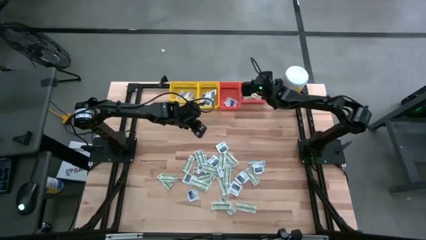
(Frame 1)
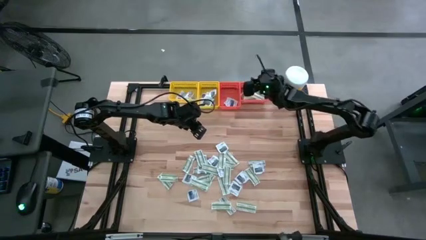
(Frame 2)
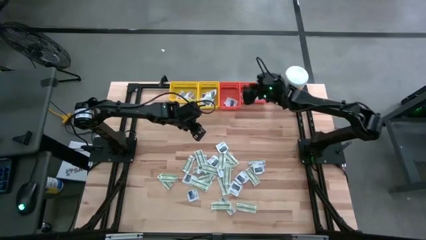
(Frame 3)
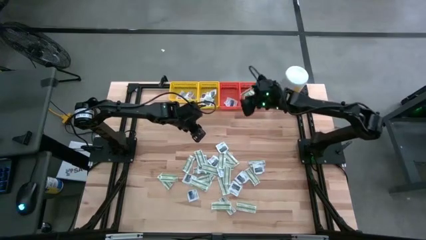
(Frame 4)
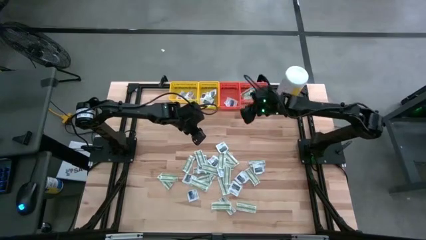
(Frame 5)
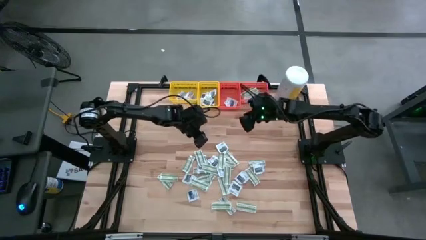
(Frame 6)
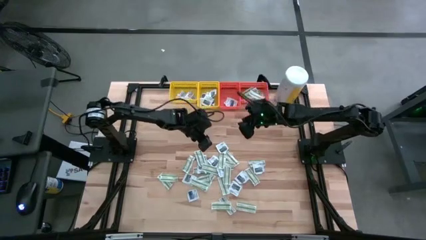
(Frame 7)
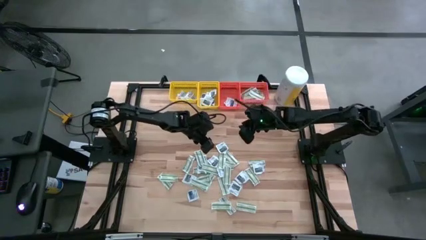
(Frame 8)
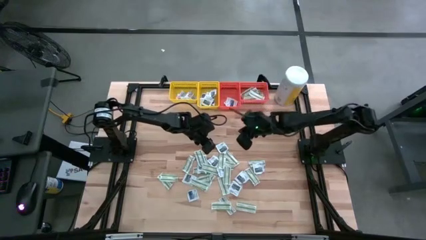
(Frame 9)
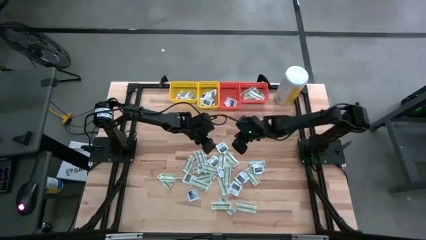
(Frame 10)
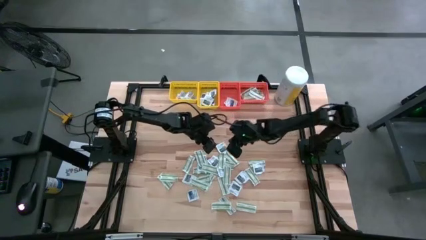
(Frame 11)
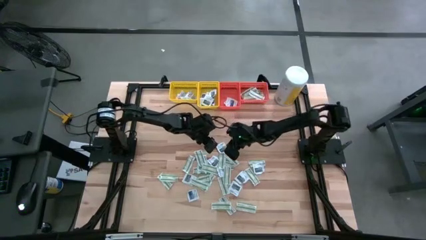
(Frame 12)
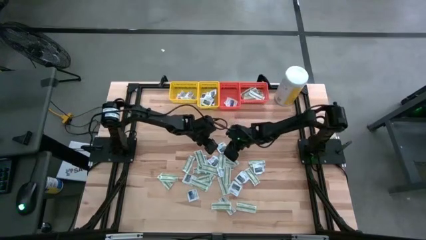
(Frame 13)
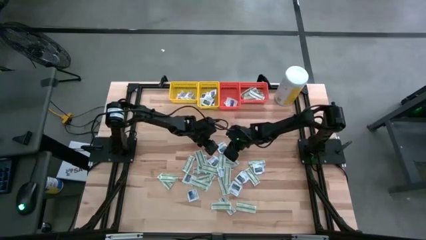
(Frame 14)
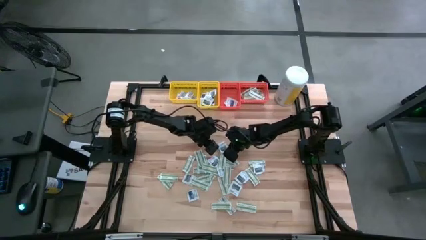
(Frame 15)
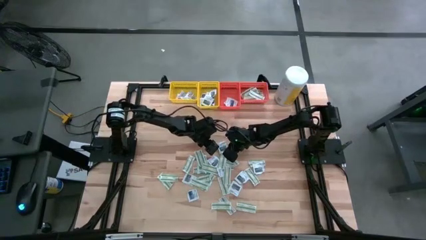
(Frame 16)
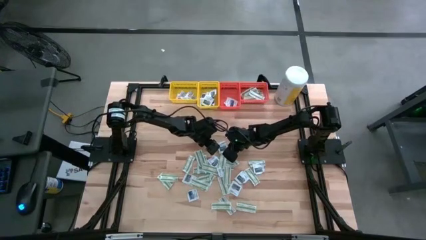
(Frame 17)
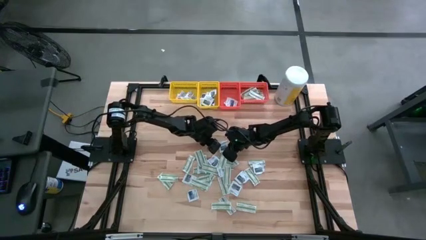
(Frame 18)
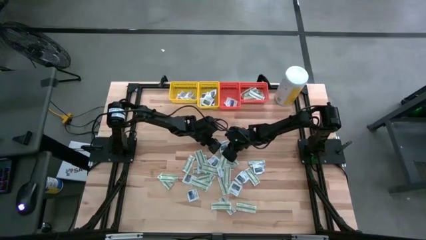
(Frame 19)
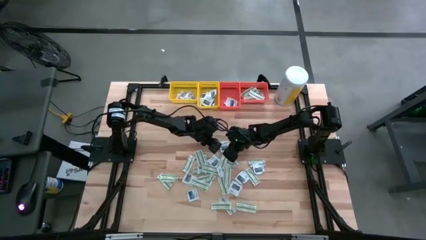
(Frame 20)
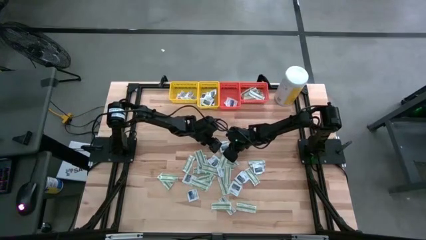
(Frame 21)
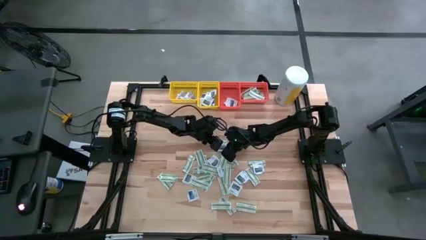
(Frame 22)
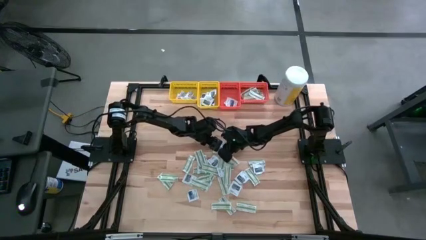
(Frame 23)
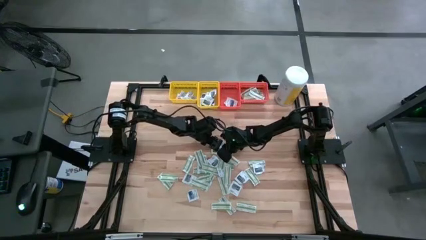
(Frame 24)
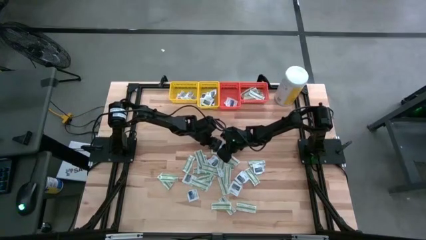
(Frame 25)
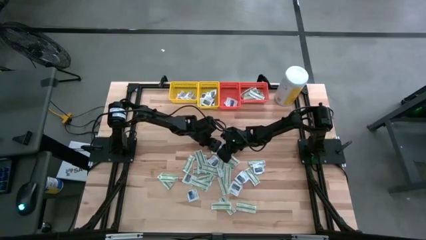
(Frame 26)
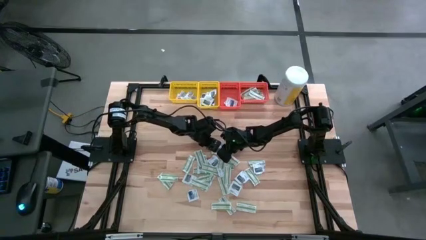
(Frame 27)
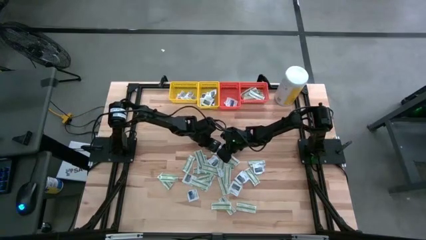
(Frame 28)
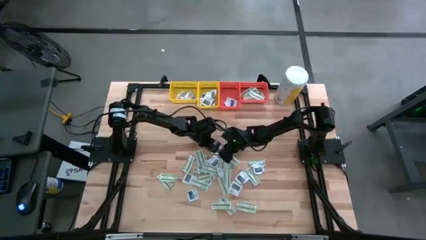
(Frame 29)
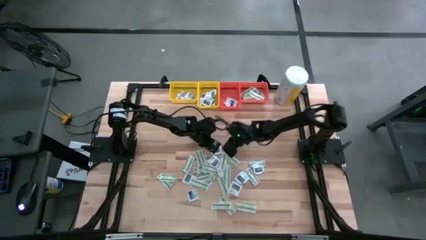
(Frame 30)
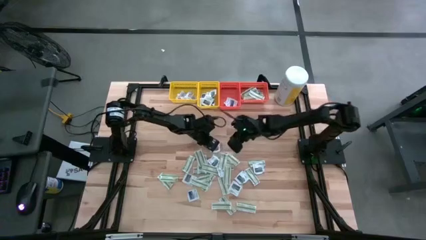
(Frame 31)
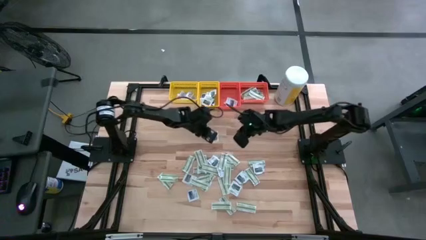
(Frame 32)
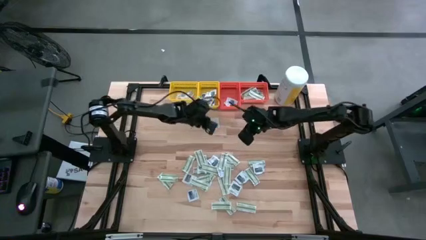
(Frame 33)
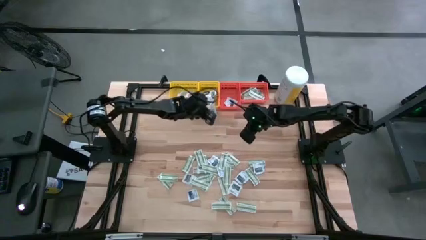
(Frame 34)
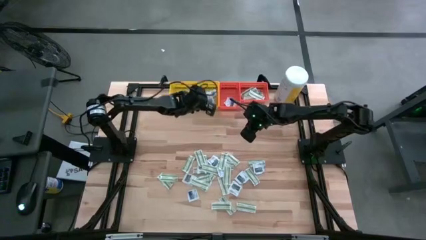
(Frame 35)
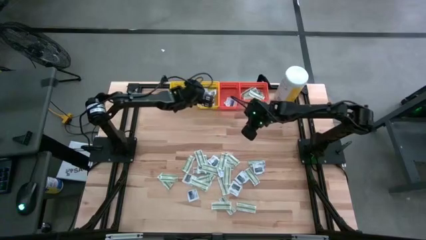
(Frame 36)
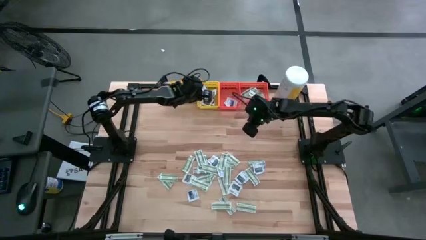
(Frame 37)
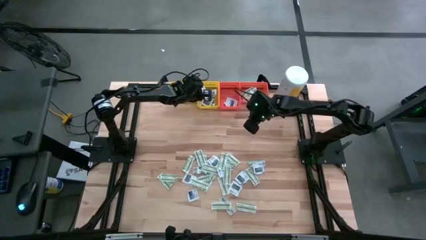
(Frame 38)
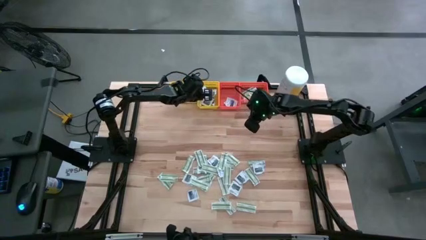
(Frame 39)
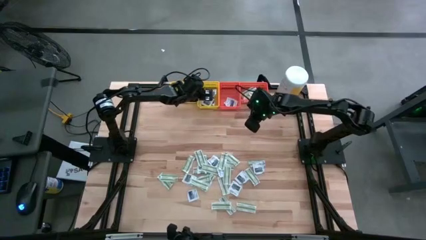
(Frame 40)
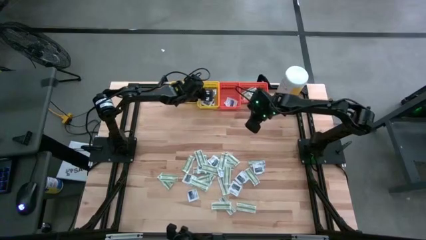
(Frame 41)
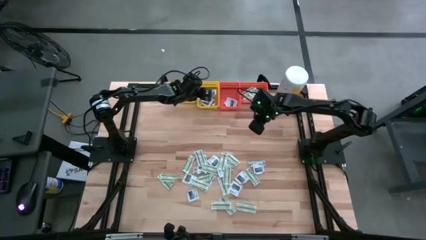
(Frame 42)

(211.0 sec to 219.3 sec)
Task: Pick & Place First Aid Supplies
Put the gray packet into the middle yellow bin

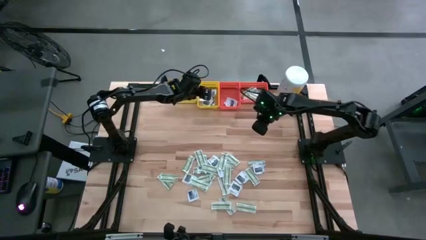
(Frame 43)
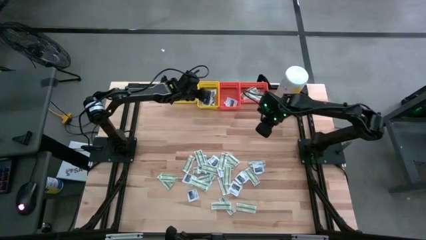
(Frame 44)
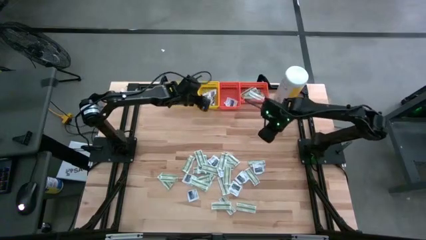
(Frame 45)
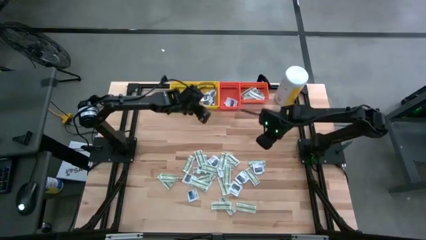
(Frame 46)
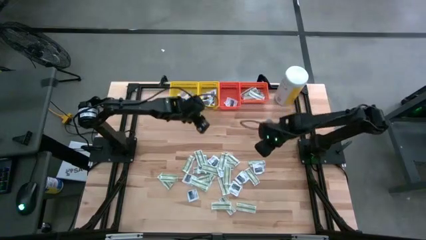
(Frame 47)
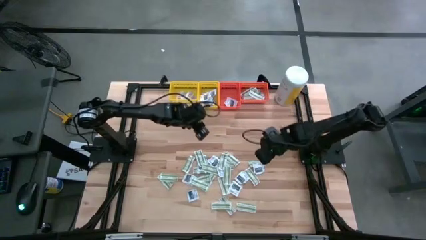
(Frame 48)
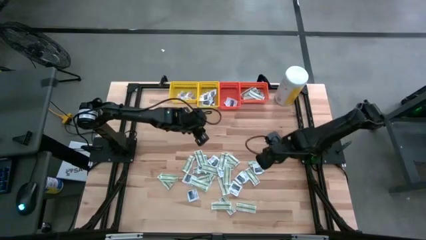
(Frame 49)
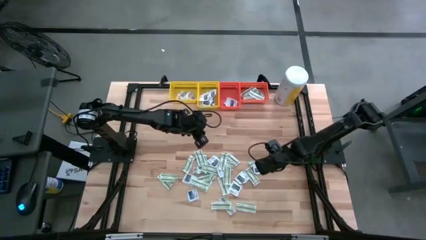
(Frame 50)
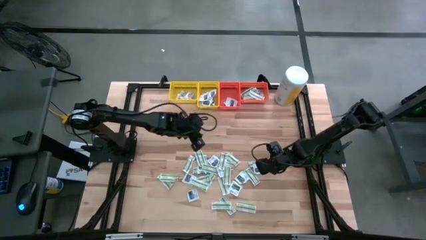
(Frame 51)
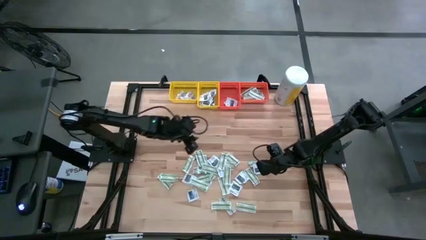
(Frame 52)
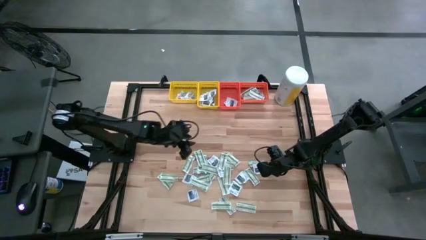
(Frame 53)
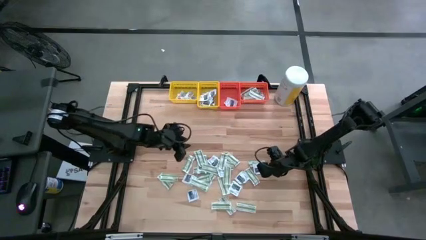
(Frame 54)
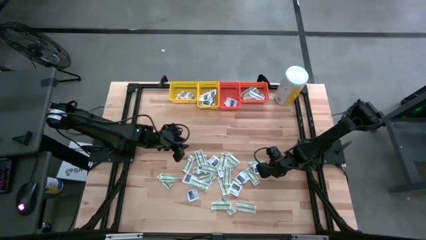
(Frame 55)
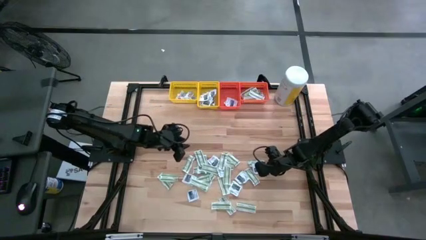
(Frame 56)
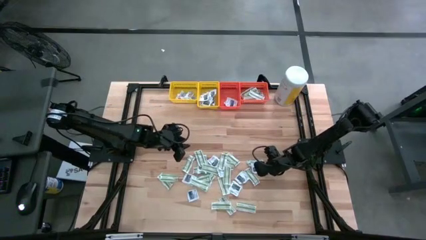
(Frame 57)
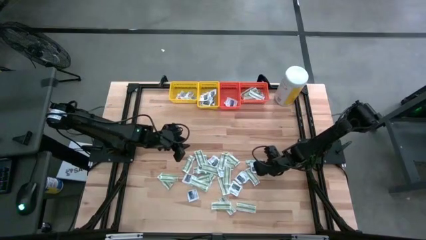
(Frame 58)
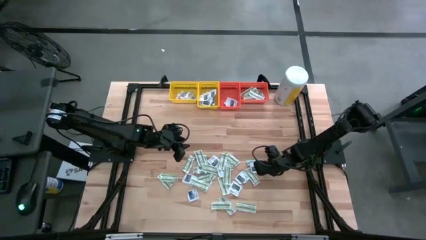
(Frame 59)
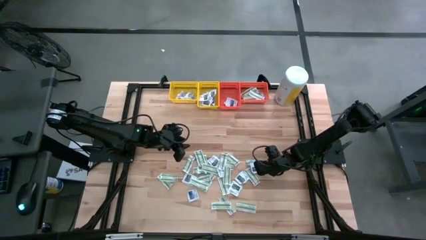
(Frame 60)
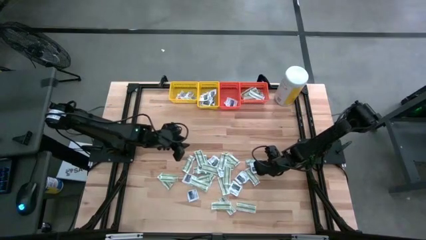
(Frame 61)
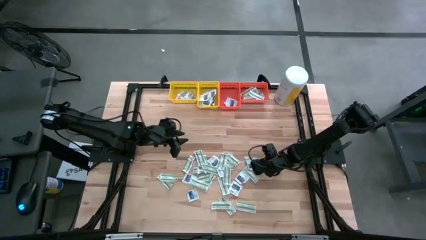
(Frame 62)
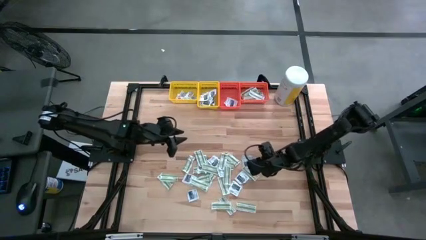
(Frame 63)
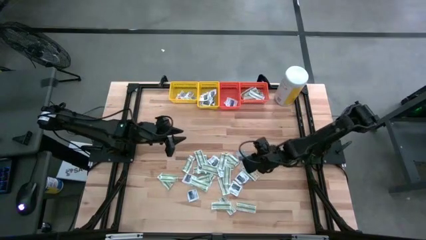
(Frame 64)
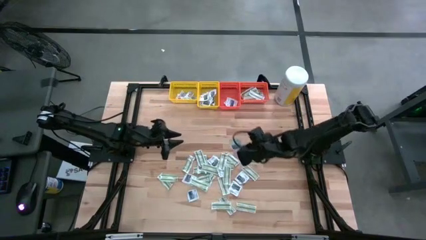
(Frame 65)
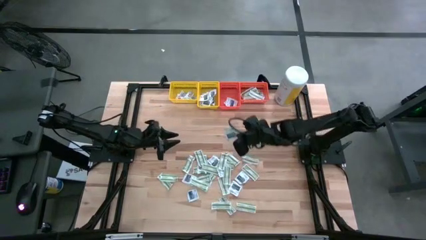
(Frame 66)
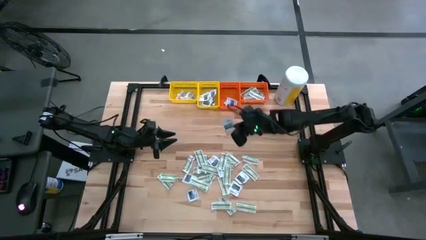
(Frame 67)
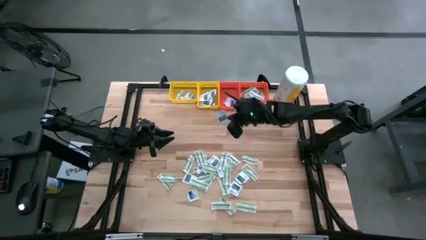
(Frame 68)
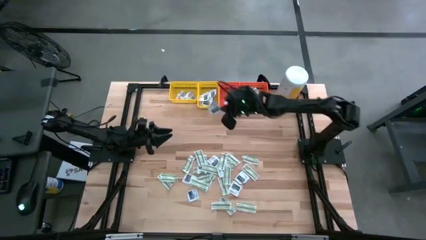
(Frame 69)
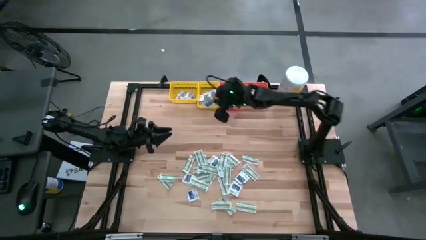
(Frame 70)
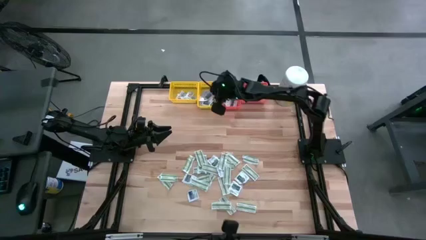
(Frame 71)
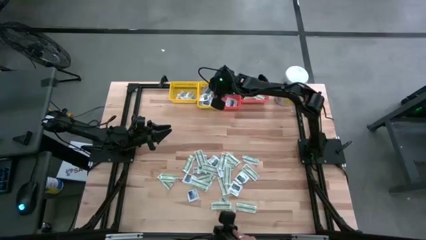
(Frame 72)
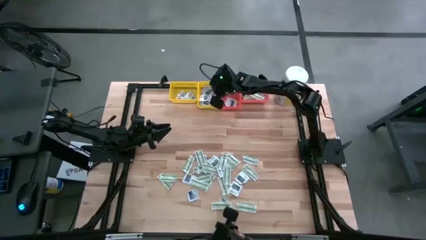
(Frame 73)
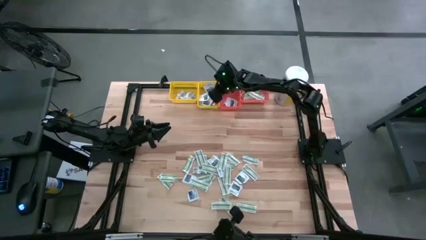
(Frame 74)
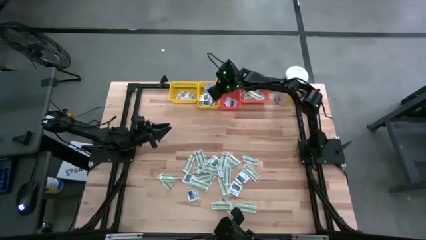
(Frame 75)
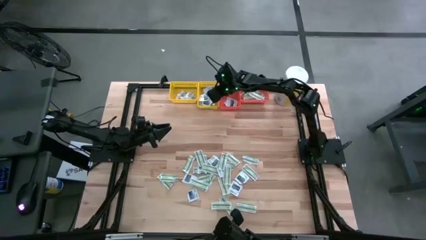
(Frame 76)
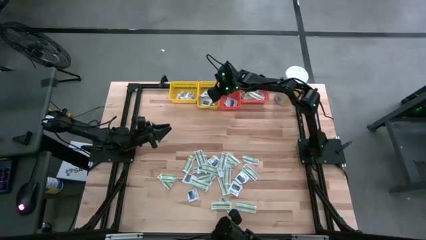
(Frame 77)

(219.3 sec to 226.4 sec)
Put the gray packet into the middle yellow bin

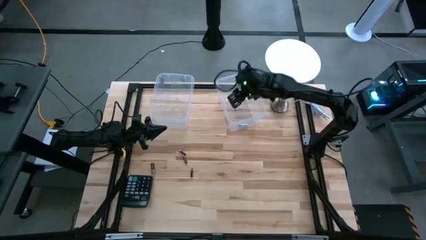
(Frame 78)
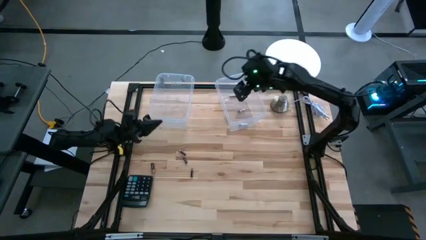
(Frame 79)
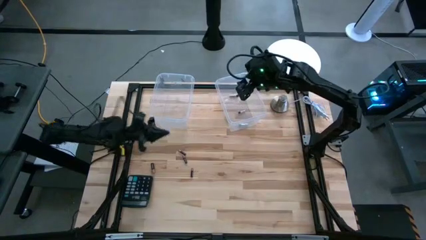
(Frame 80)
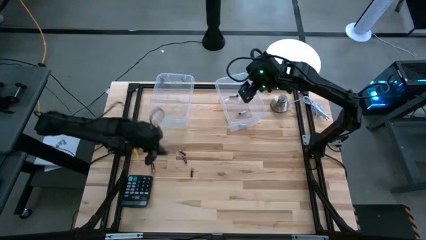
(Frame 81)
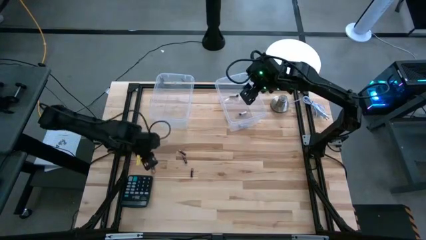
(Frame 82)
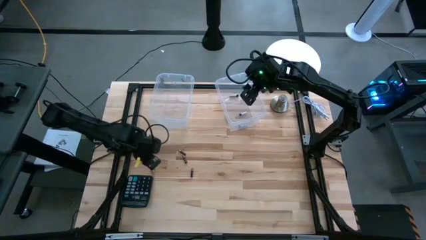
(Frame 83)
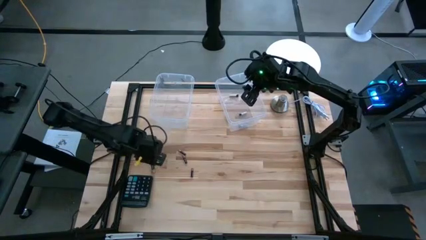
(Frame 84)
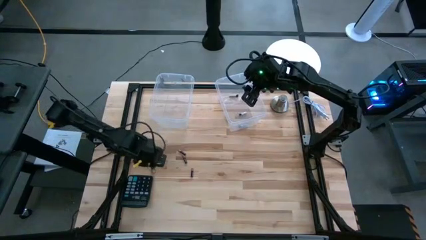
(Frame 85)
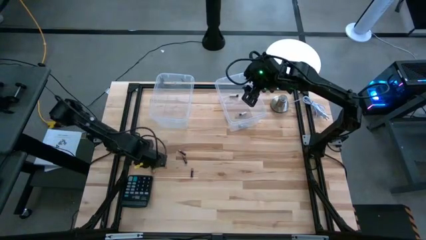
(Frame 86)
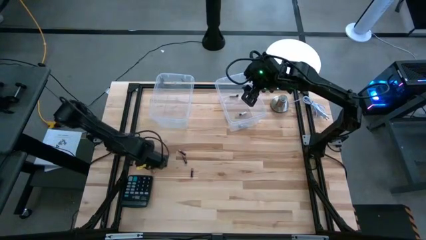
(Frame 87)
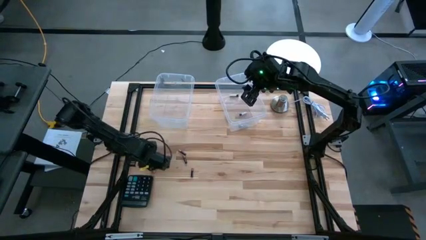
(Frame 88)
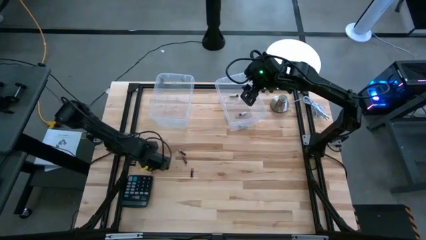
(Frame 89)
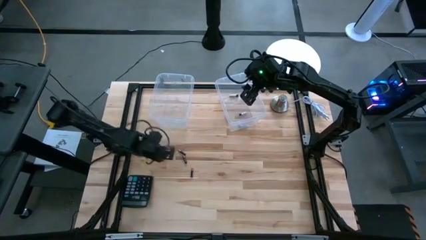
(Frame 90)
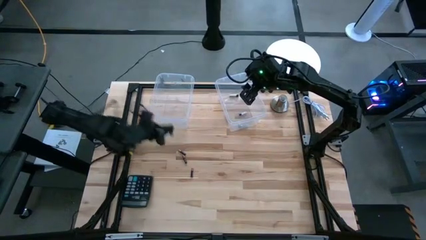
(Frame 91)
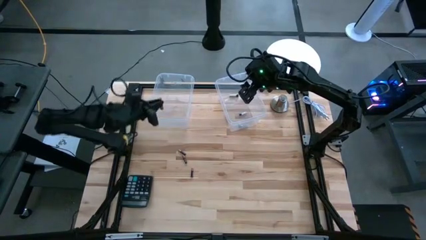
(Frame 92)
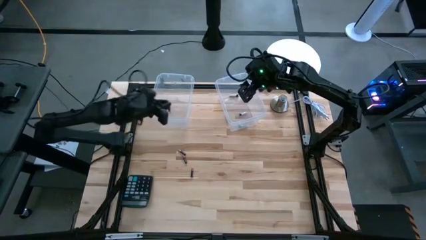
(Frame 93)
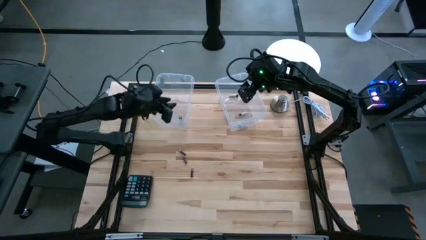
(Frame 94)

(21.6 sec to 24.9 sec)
Task: Sort batteries
Put the black battery into the left transparent bin
